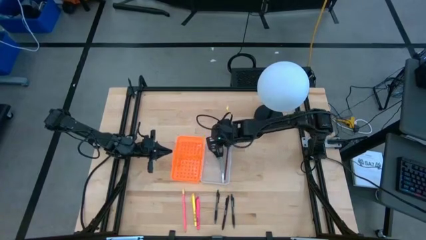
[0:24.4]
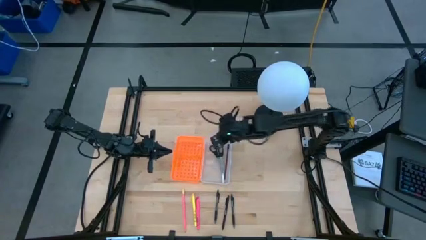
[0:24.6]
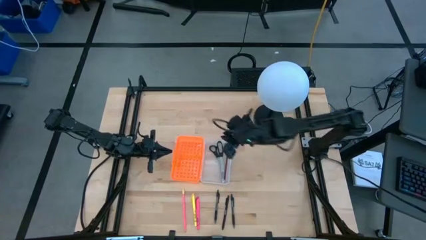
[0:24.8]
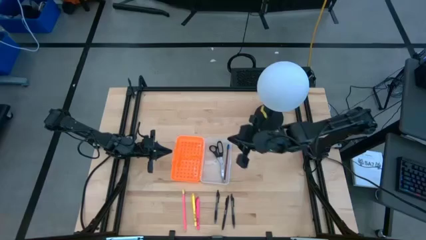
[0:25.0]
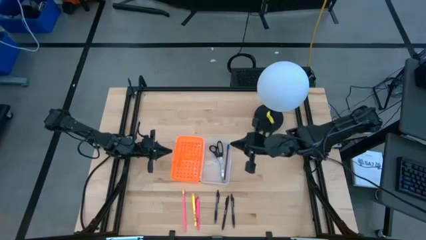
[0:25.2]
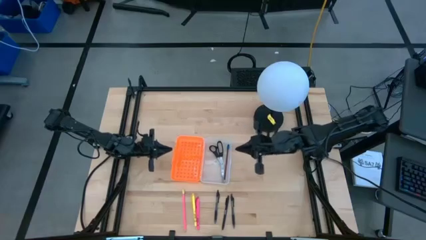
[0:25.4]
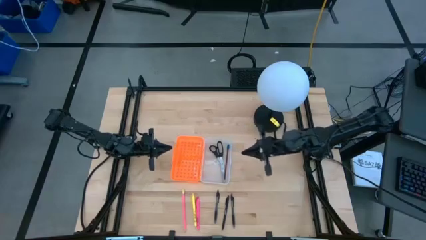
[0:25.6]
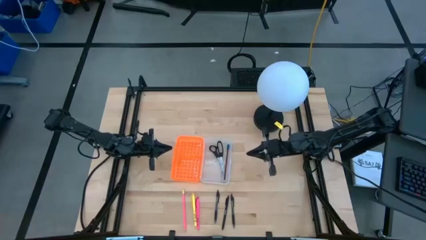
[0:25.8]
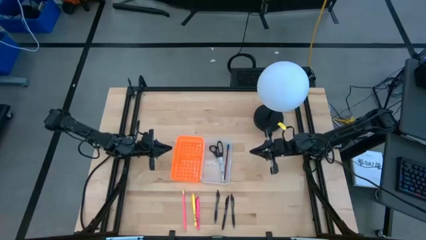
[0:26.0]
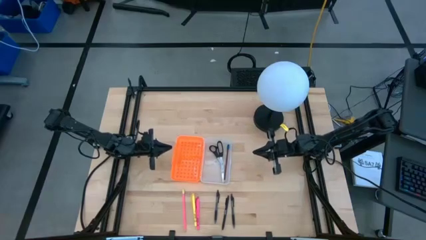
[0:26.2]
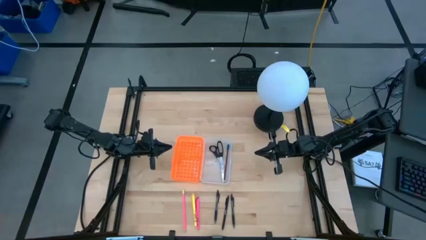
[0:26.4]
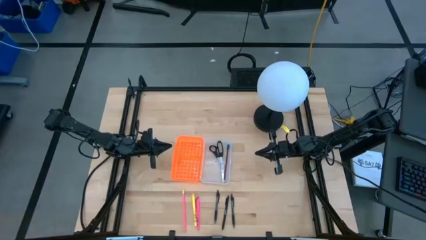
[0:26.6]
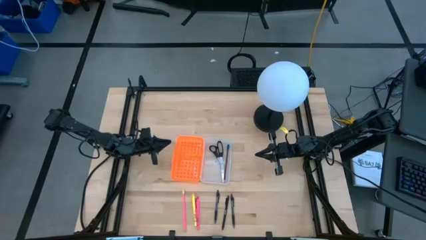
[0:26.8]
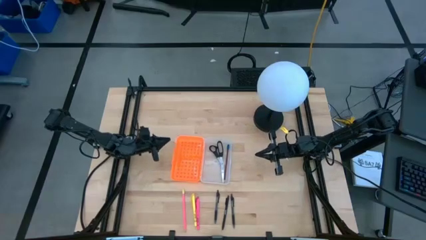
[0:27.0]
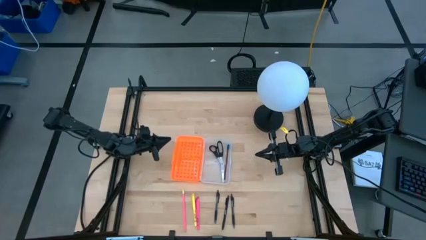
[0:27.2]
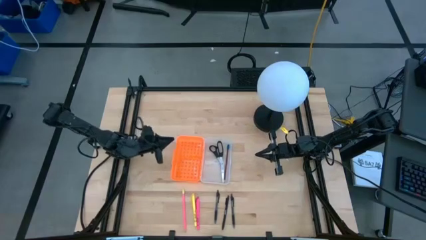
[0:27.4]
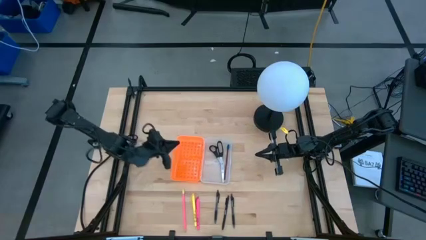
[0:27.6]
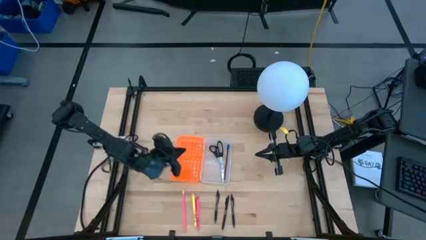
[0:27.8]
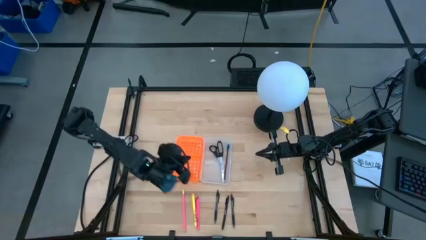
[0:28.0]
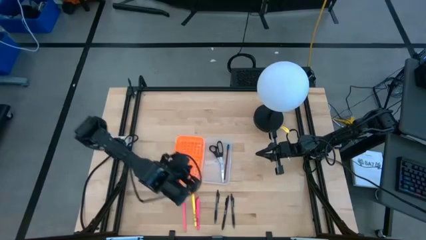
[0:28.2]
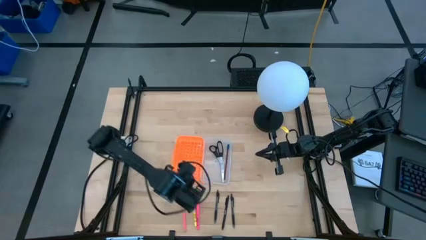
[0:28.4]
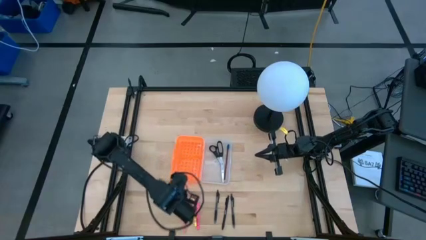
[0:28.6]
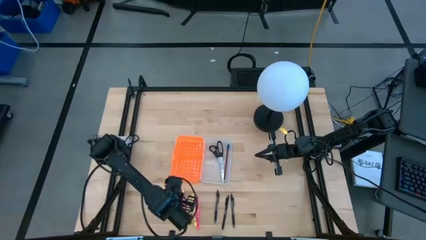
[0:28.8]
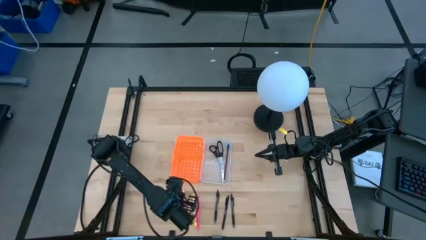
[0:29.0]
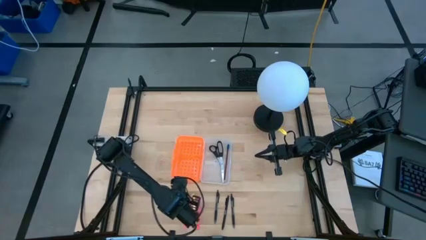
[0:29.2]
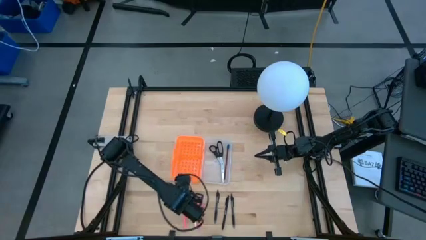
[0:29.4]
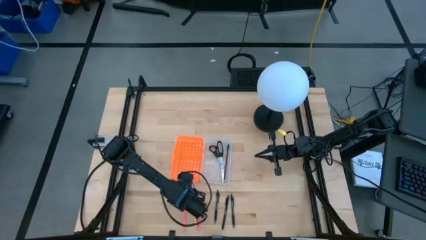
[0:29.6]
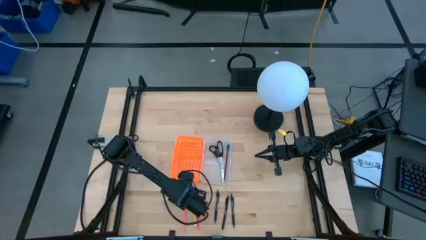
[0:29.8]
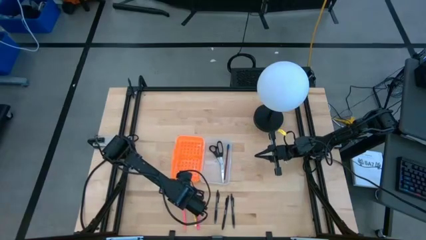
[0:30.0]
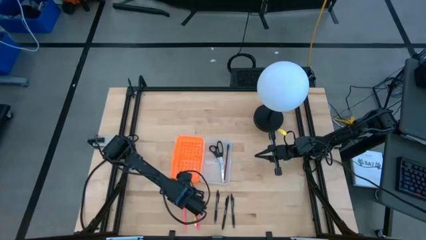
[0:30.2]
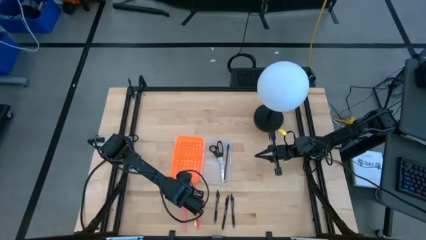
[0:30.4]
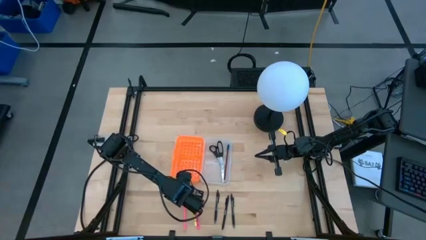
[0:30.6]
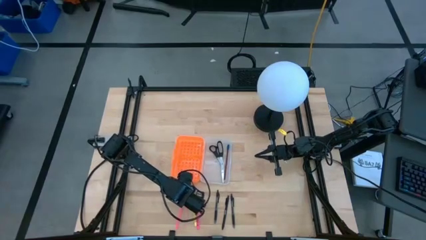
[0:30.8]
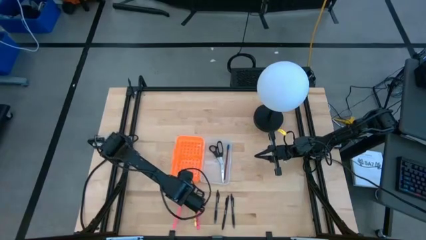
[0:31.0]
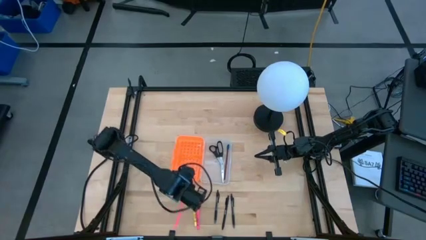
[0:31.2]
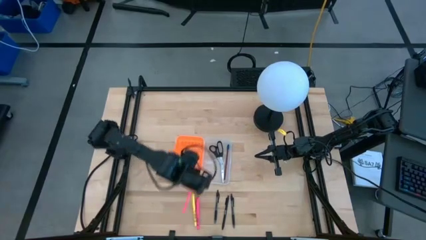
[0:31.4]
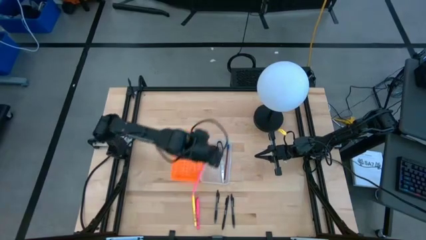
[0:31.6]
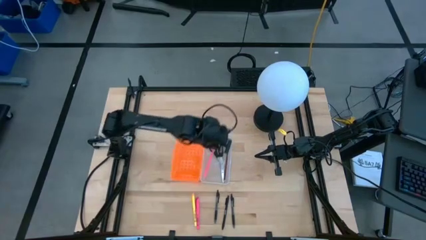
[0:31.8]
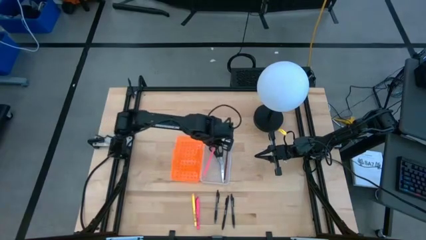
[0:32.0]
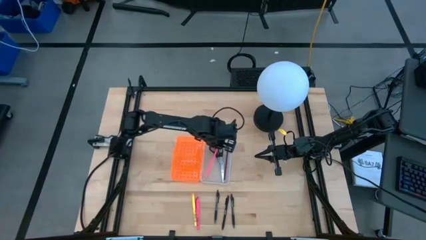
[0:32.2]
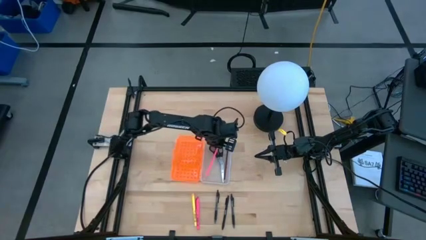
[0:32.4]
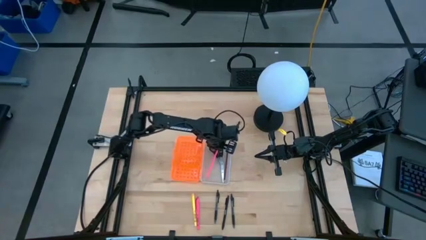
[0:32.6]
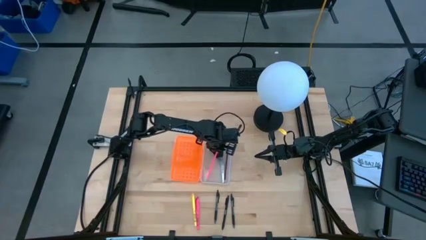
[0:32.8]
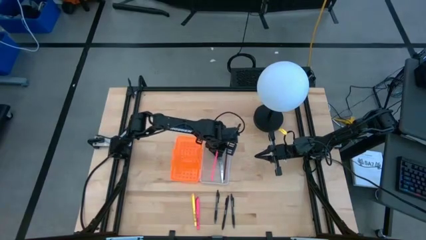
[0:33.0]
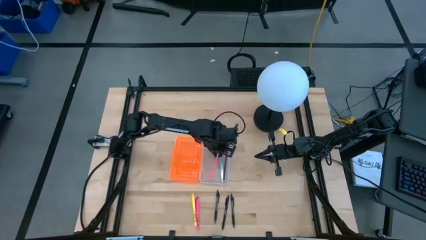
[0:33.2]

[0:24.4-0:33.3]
Task: Pick & place school supplies into a supply box
Put the pink pencil into the supply box

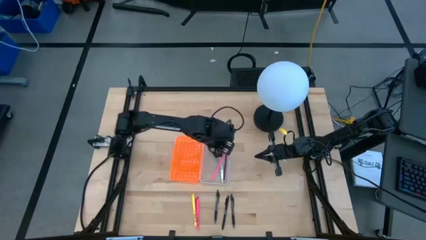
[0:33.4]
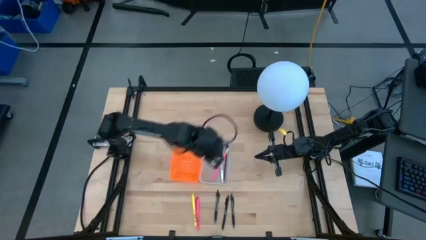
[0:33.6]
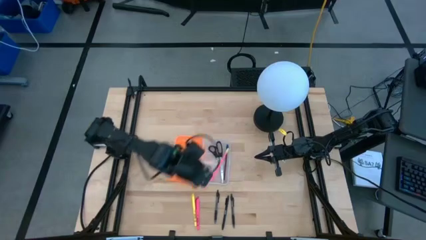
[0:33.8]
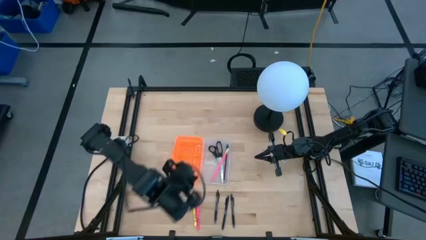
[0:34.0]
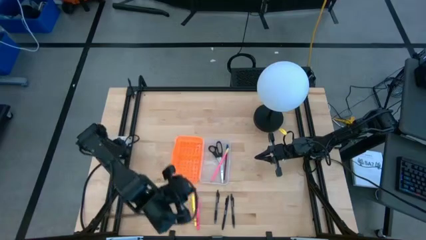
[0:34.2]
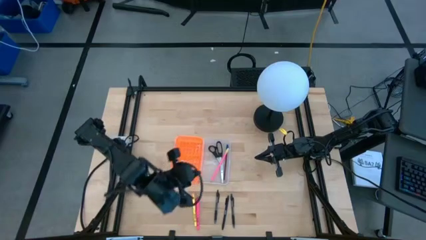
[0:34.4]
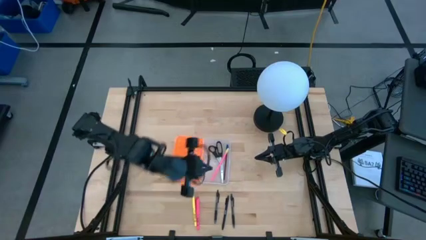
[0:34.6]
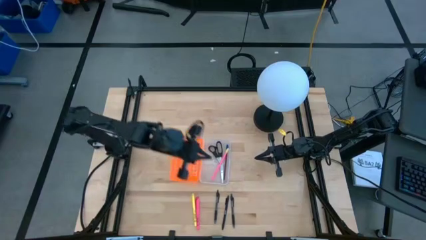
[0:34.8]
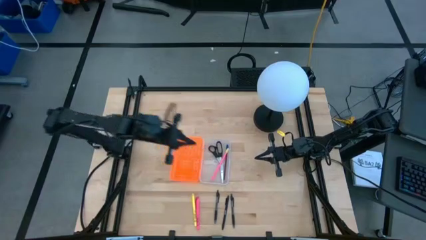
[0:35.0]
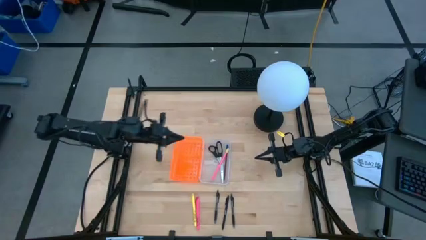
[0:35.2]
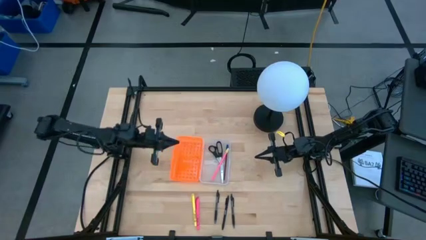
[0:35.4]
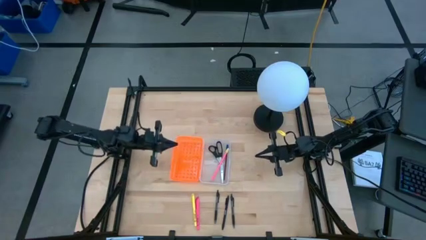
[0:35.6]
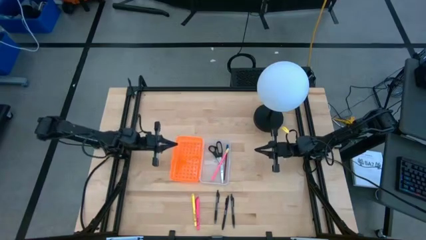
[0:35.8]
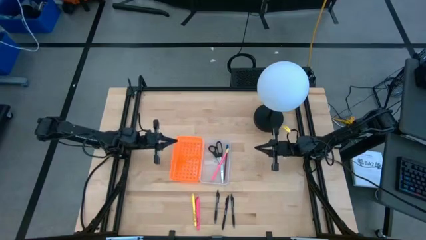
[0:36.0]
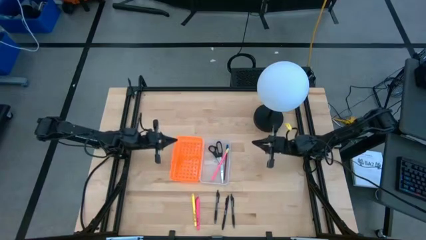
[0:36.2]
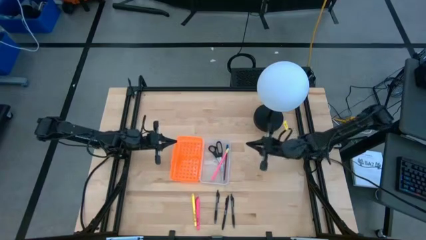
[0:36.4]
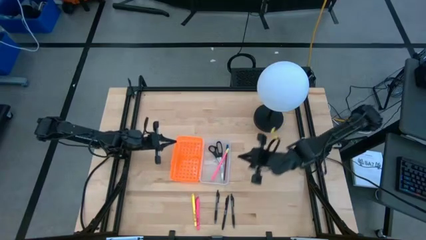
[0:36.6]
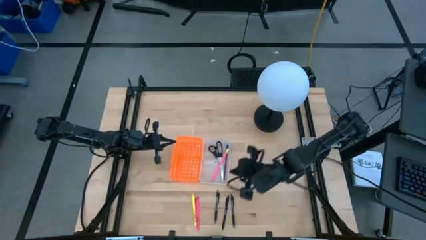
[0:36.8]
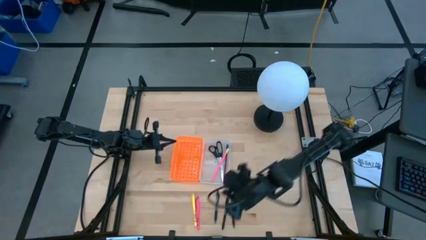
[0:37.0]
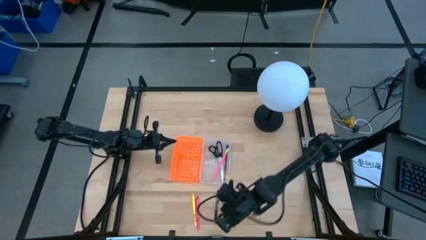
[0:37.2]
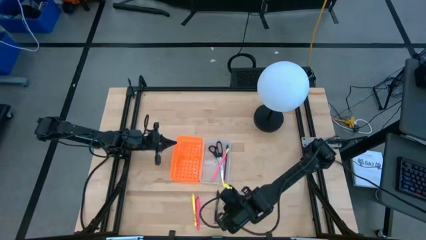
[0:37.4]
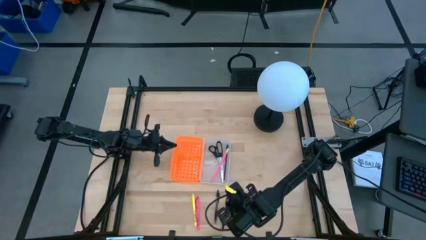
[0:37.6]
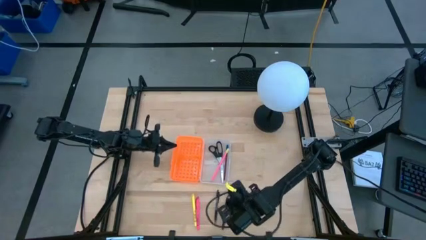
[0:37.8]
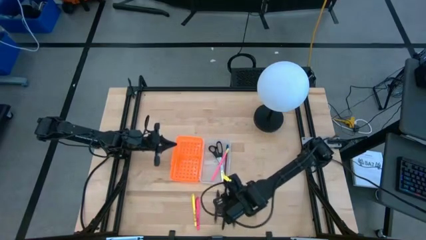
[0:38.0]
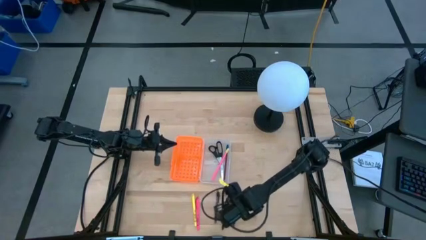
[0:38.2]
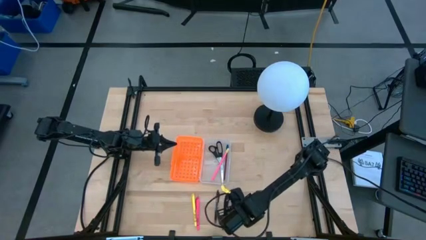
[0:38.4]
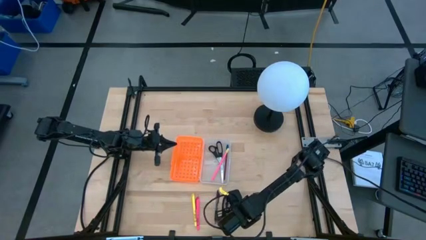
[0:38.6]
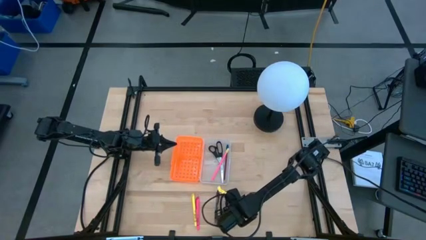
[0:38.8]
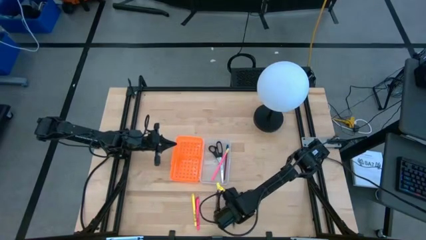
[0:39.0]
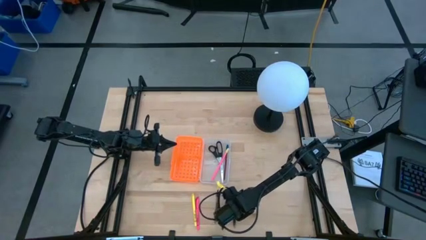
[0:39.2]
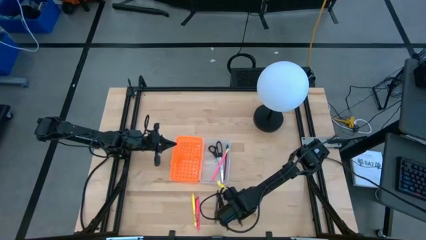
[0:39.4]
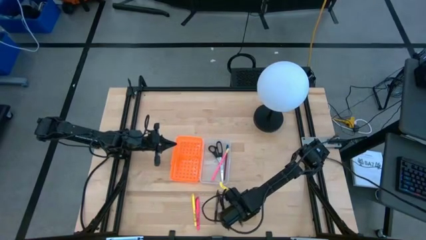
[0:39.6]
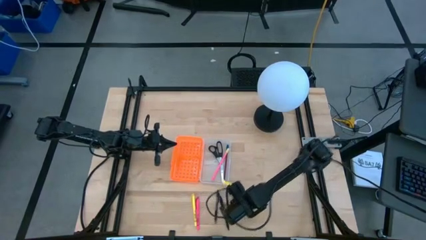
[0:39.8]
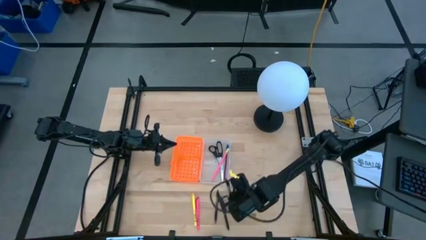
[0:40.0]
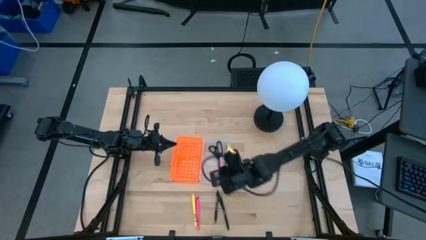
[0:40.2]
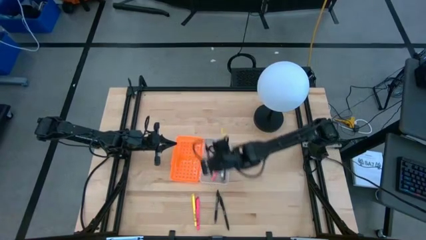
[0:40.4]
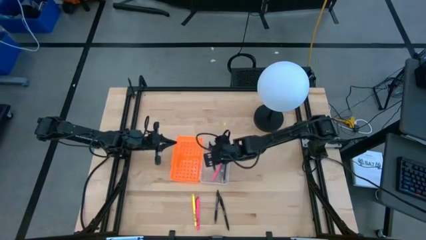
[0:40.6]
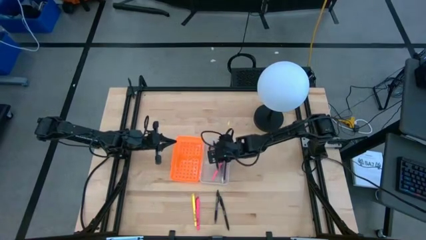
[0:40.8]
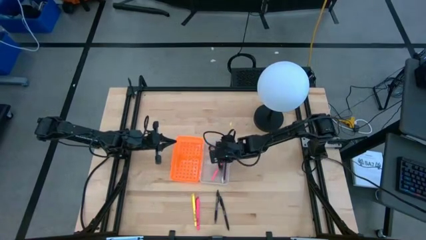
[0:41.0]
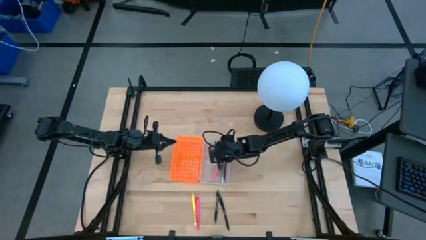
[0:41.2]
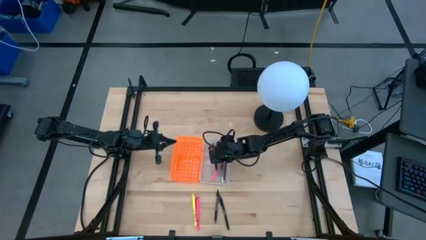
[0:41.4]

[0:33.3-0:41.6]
Put the right black pen into the supply box
